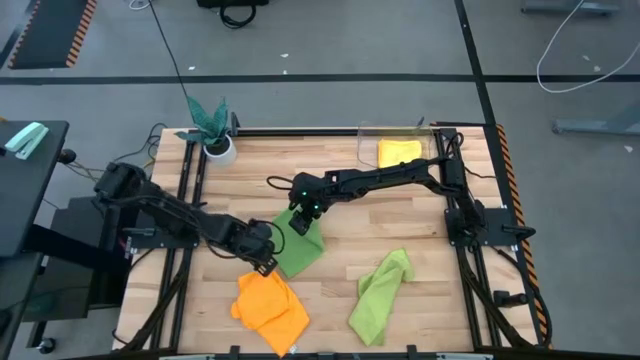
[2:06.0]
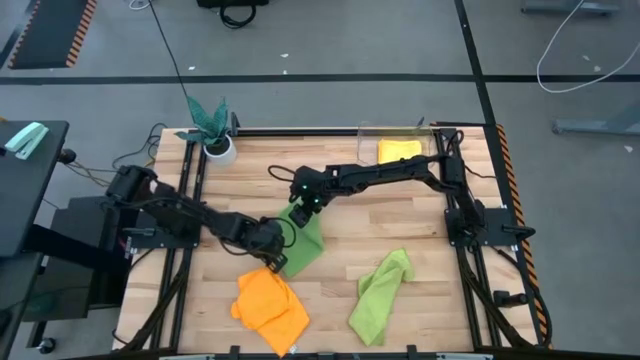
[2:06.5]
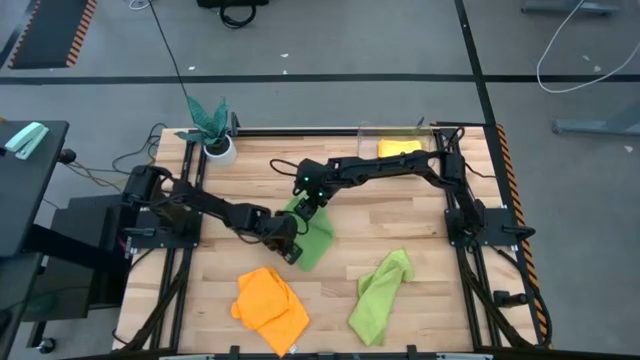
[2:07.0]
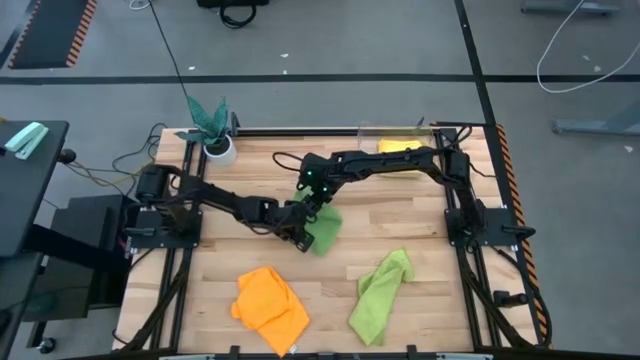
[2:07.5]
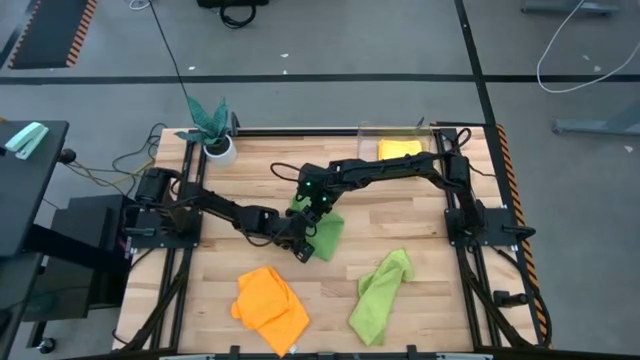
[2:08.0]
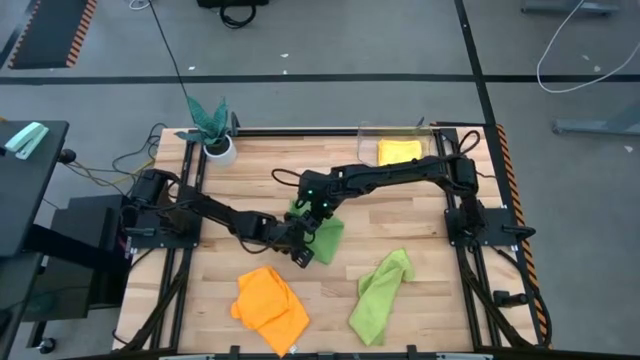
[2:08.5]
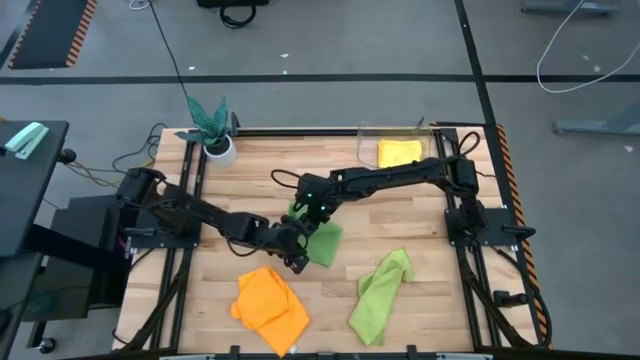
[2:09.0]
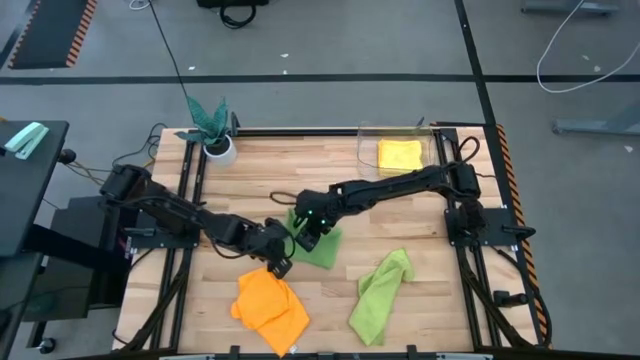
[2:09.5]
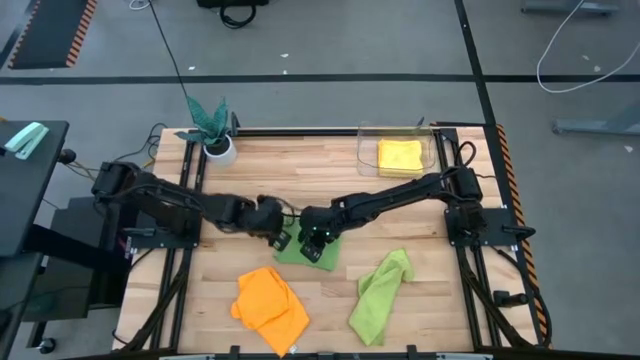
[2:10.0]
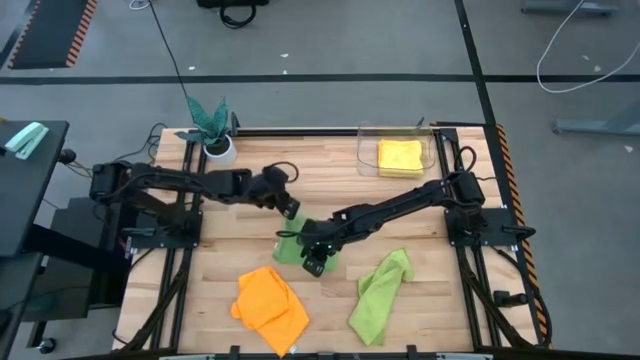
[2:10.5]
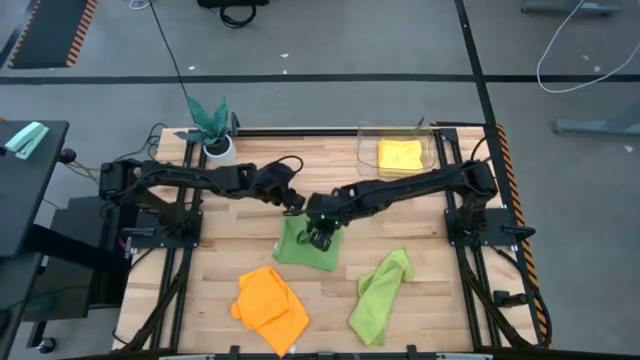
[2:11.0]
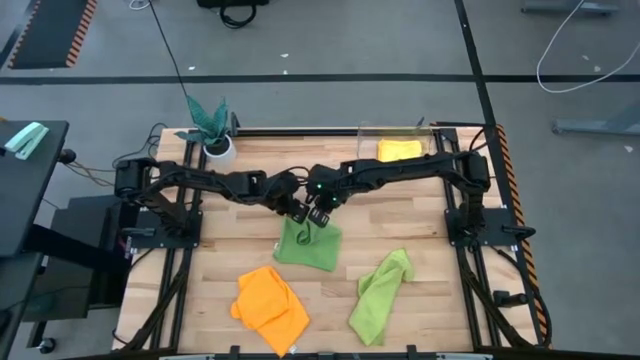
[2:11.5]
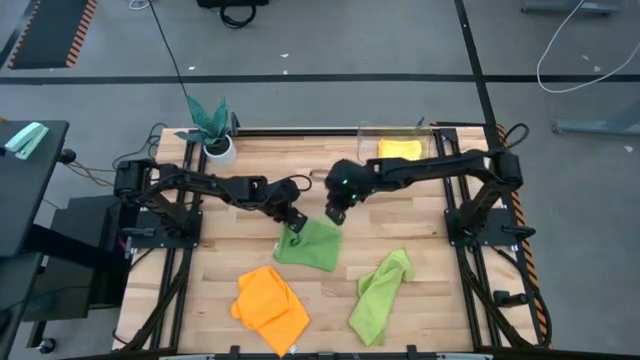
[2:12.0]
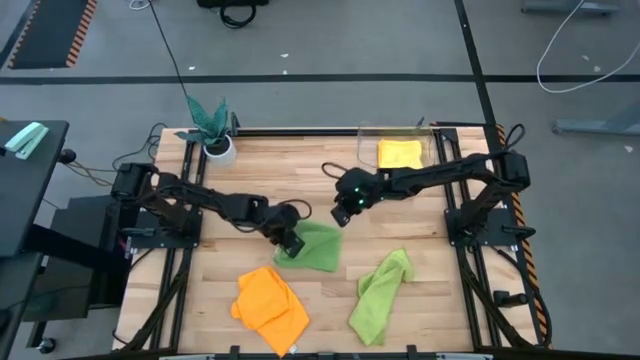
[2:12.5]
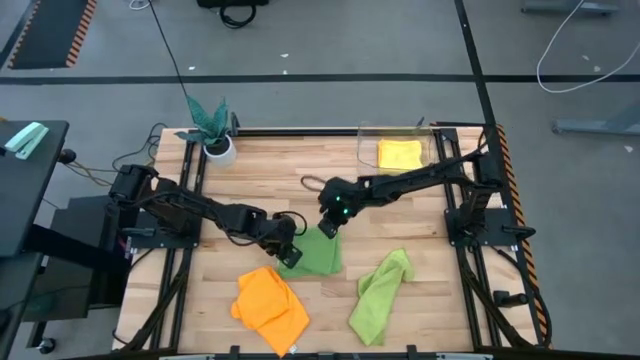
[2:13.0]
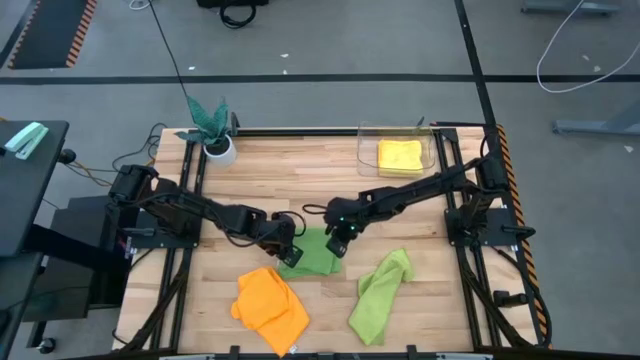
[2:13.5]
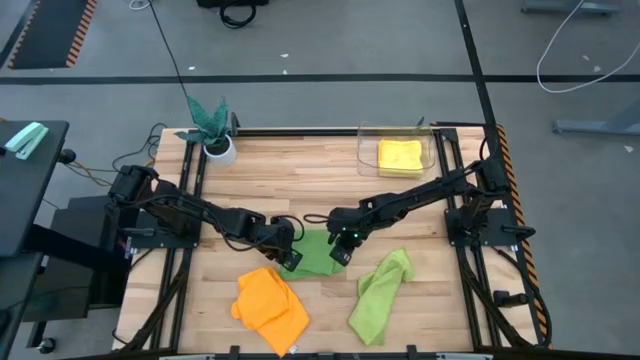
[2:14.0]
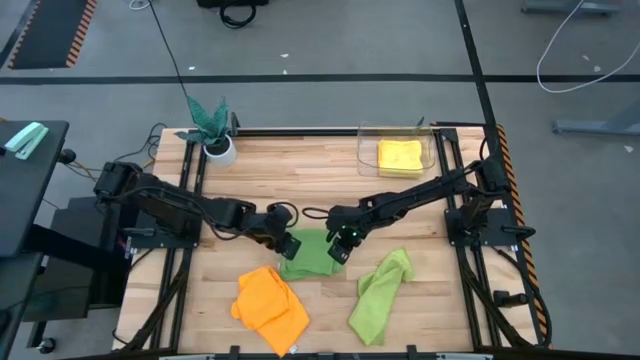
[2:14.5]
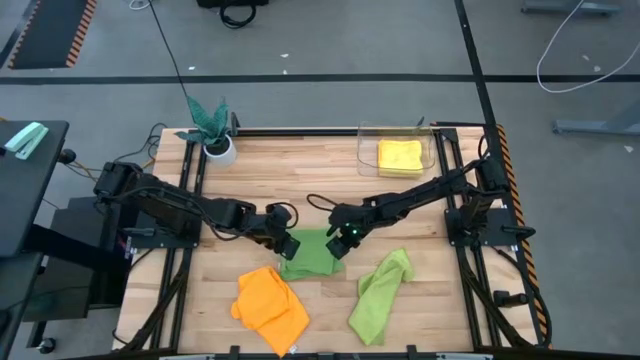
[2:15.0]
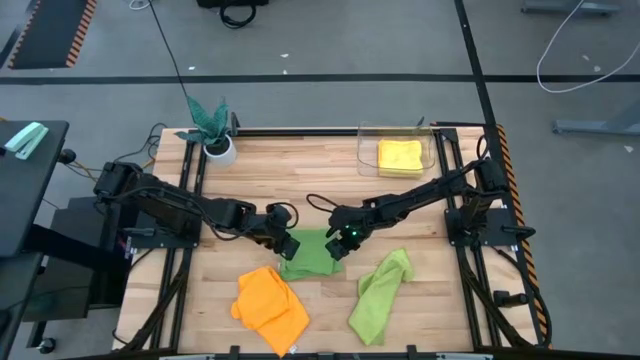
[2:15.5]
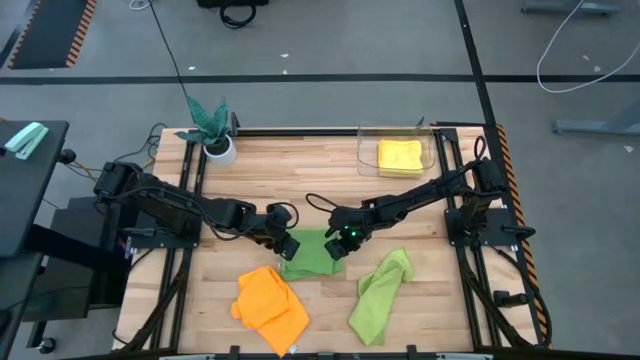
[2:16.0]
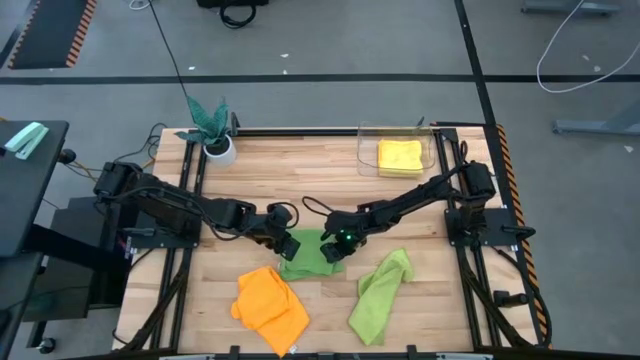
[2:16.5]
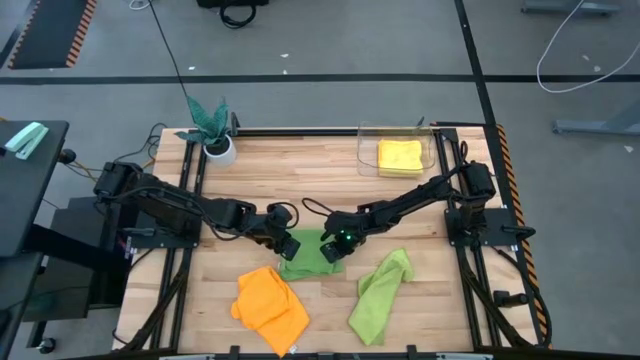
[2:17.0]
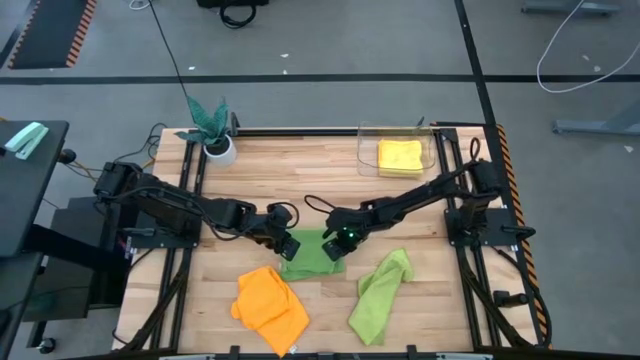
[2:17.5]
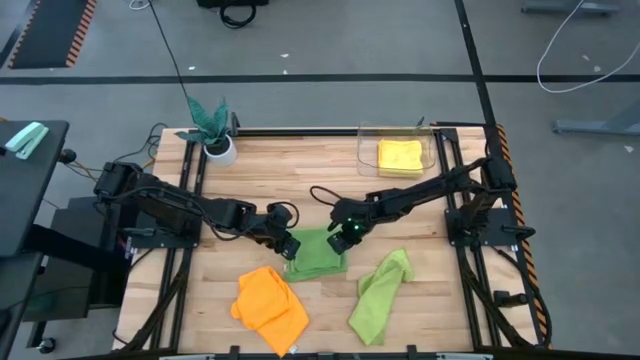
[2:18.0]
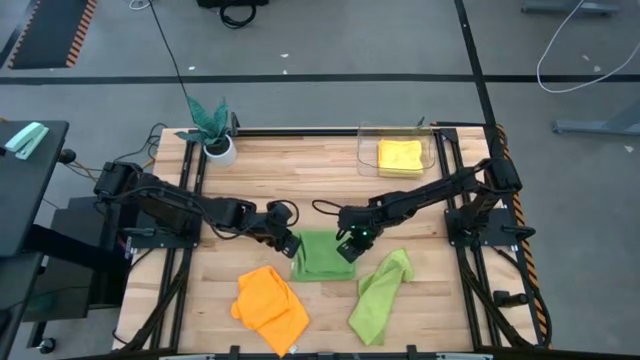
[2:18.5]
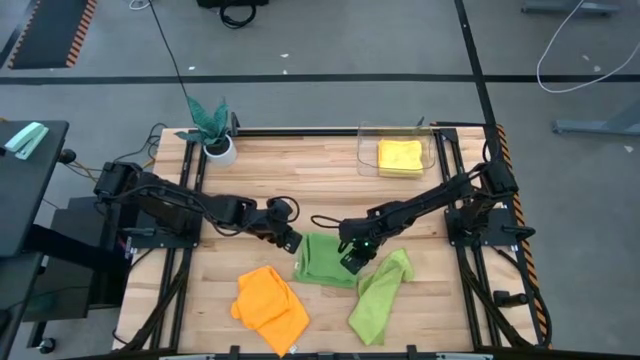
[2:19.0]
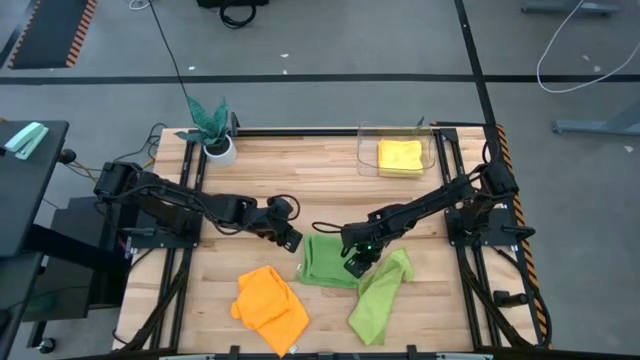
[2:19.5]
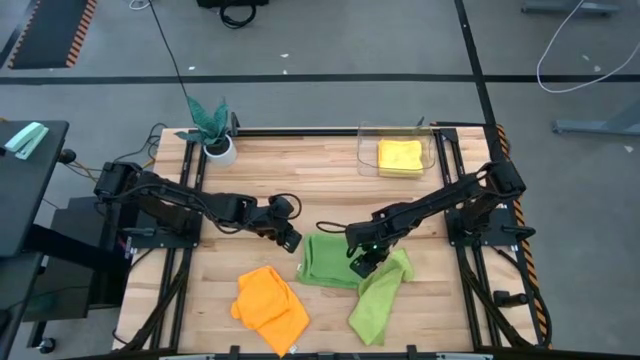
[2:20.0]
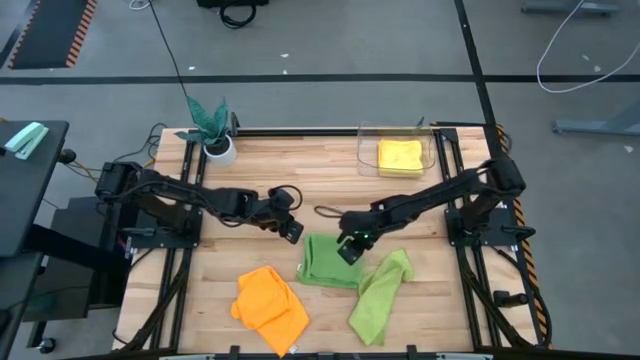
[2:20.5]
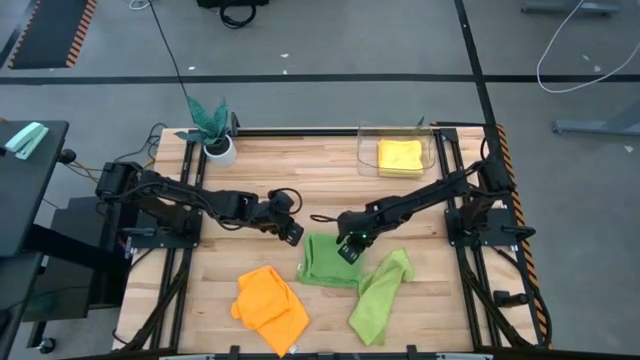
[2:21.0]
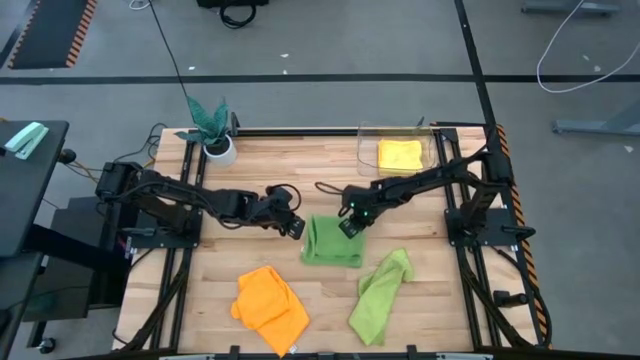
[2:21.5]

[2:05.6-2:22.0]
Task: Fold microfiber towels
Fold the green towel

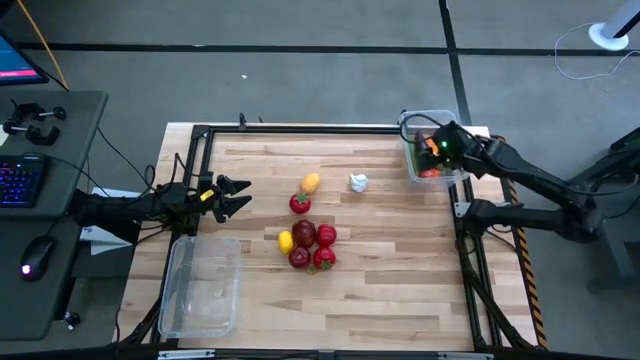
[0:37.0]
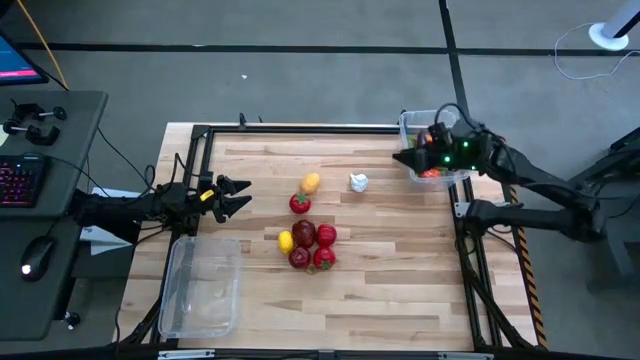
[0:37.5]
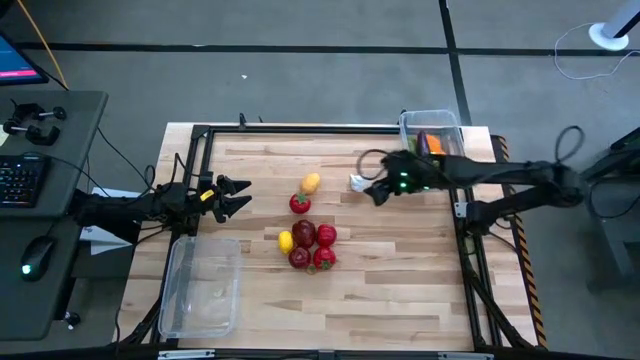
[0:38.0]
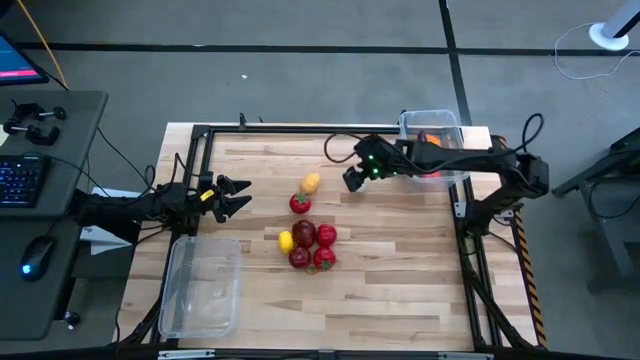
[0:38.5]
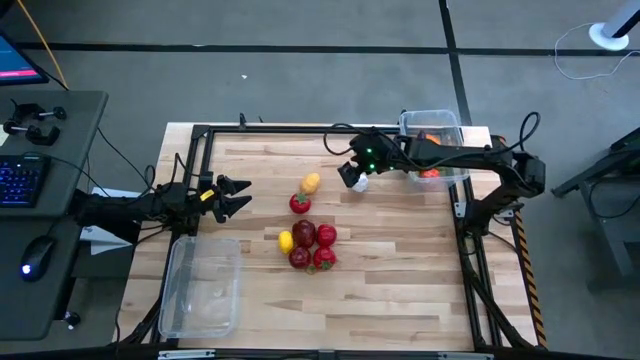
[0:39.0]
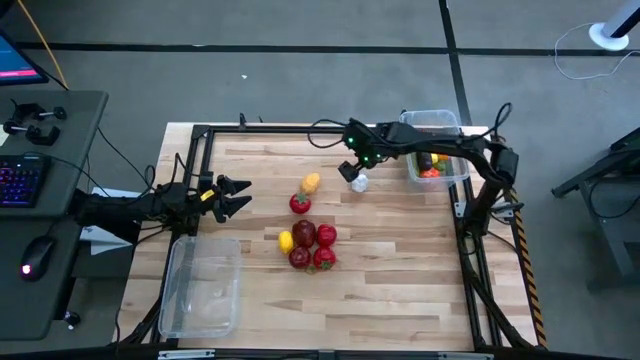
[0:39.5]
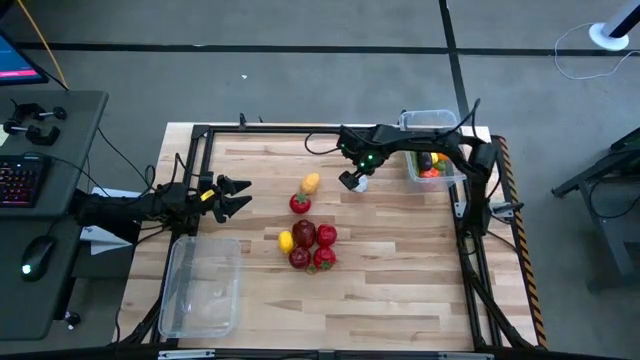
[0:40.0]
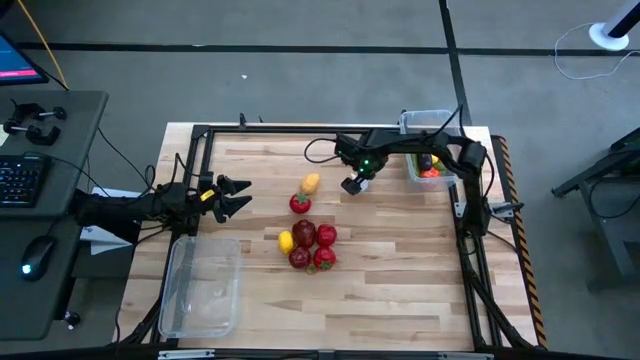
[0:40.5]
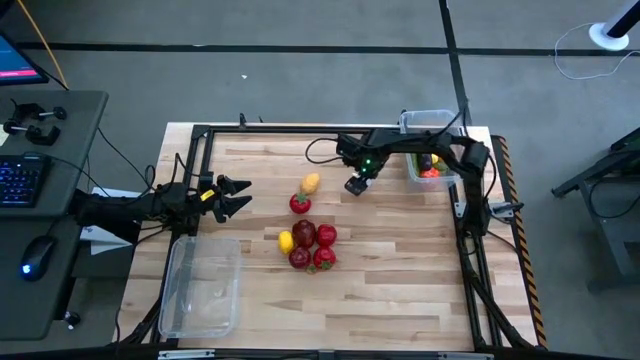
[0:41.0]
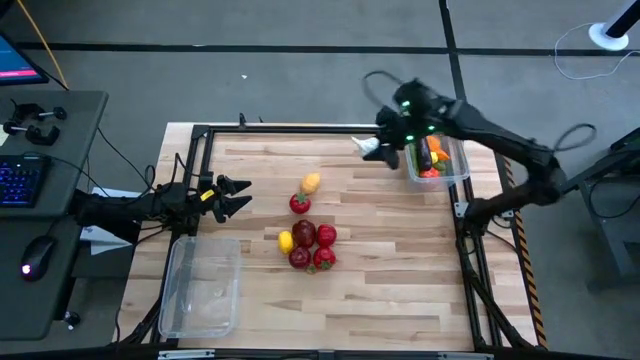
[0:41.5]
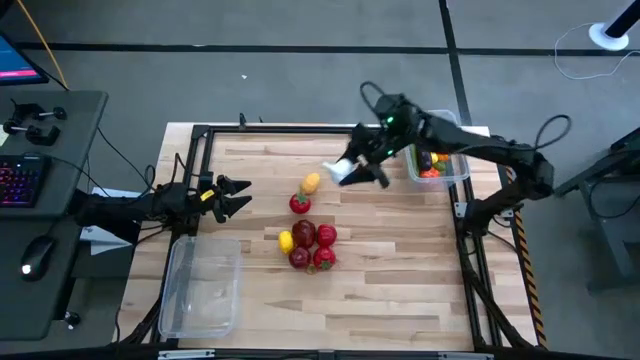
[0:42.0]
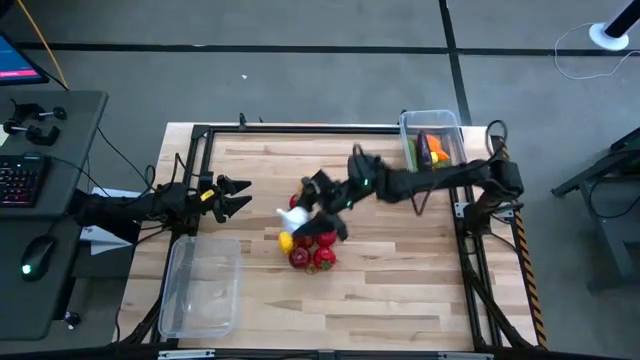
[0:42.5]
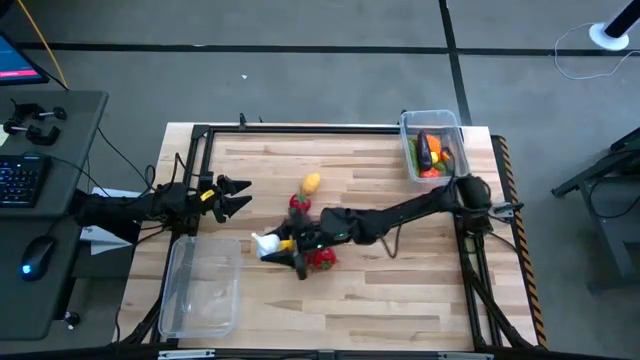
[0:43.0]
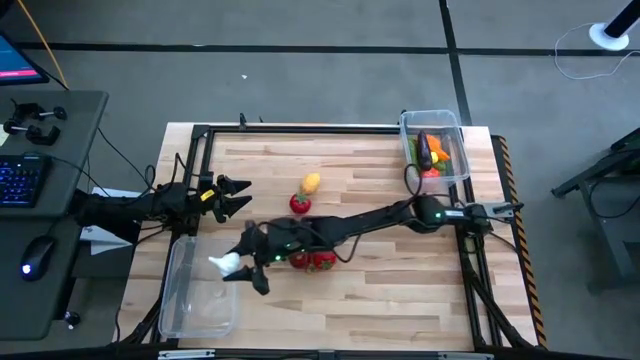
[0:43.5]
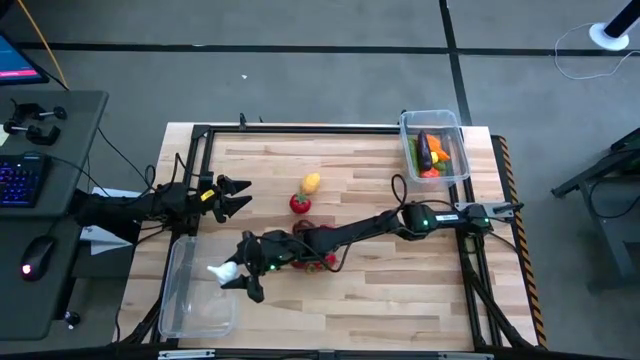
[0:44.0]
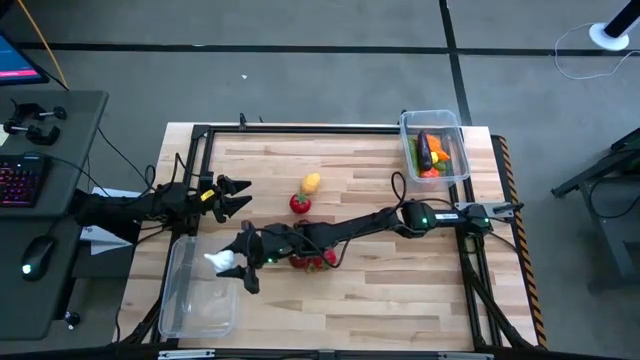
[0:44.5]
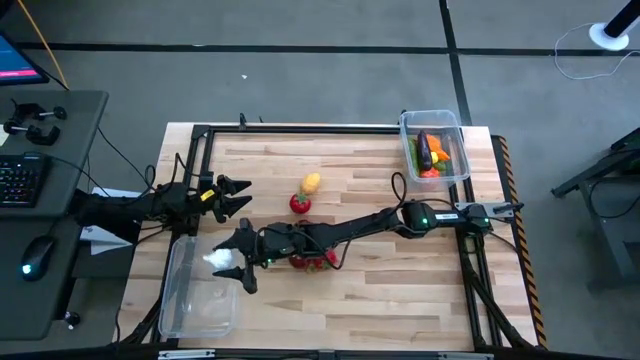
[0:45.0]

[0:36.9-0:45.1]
Task: Sort produce into baskets
Put the white garlic into the top transparent bin
